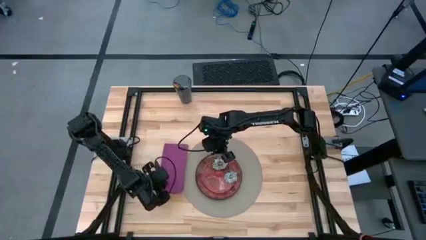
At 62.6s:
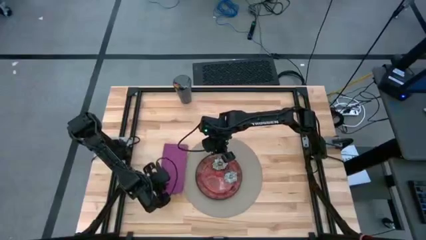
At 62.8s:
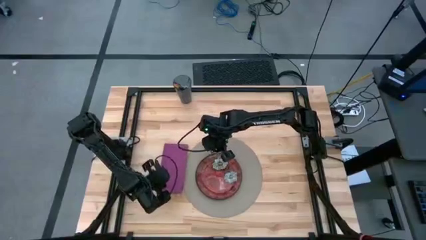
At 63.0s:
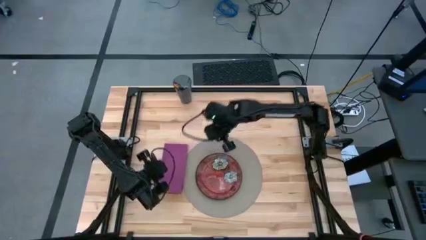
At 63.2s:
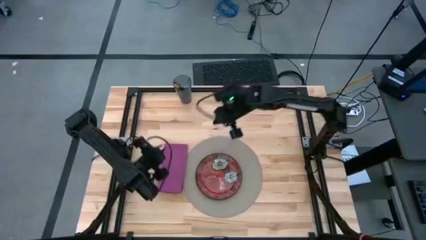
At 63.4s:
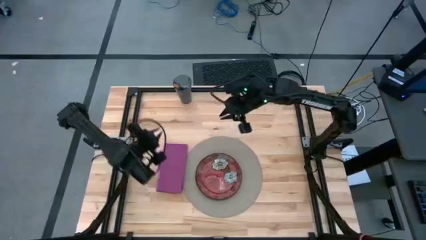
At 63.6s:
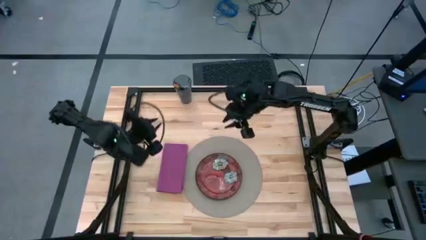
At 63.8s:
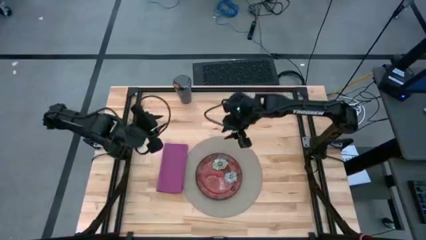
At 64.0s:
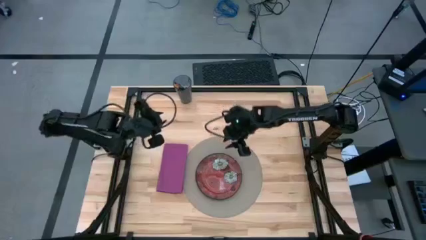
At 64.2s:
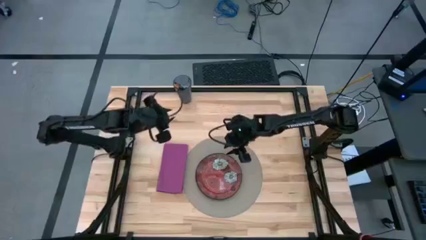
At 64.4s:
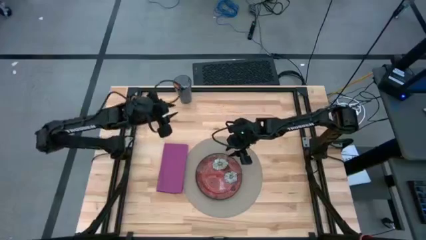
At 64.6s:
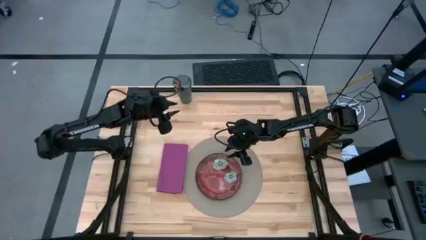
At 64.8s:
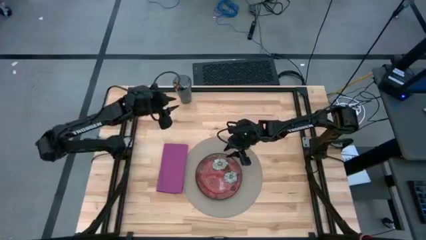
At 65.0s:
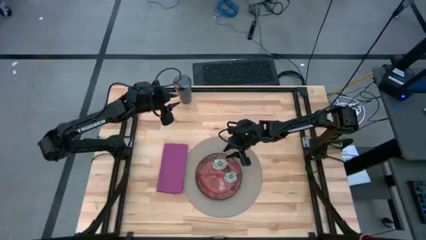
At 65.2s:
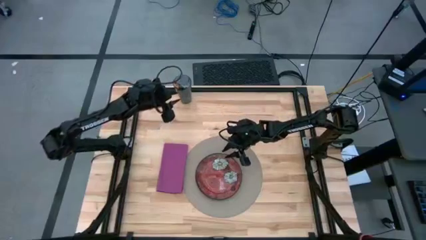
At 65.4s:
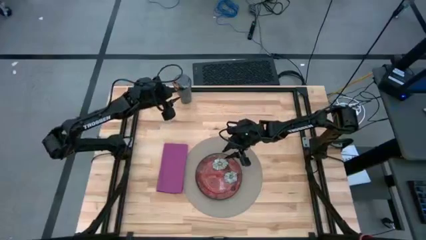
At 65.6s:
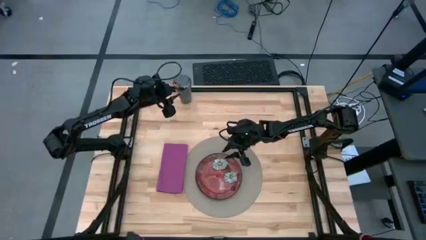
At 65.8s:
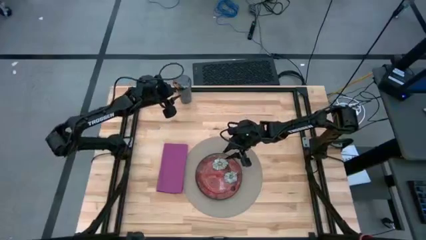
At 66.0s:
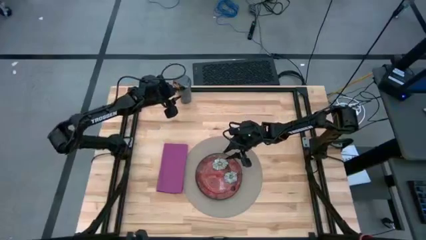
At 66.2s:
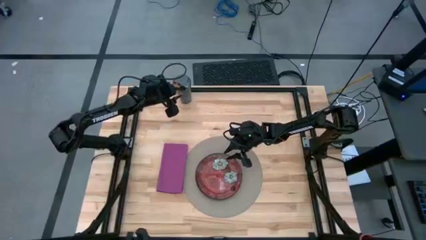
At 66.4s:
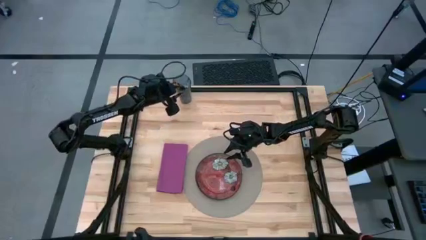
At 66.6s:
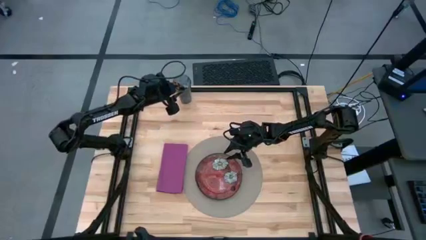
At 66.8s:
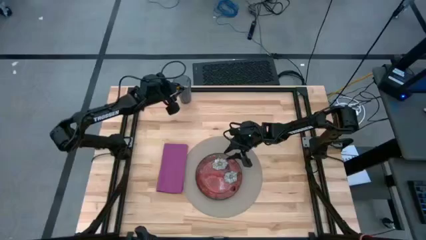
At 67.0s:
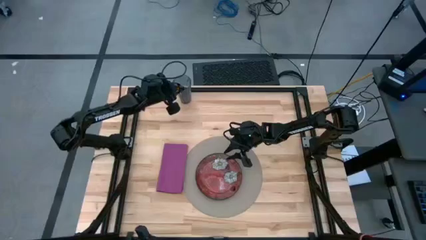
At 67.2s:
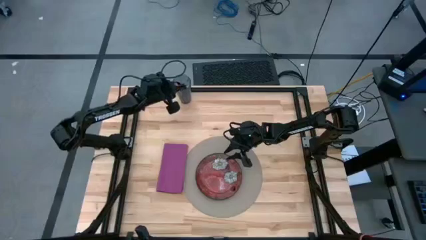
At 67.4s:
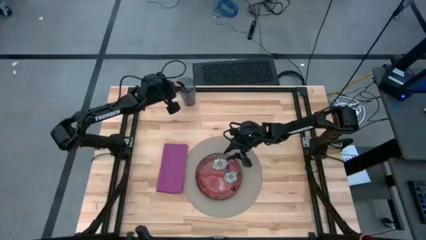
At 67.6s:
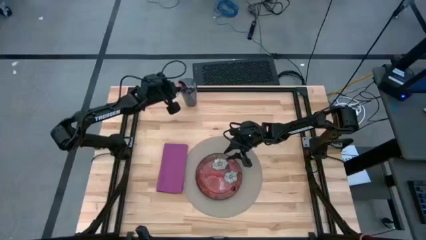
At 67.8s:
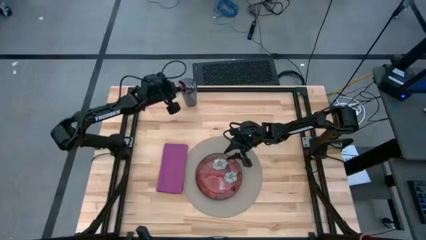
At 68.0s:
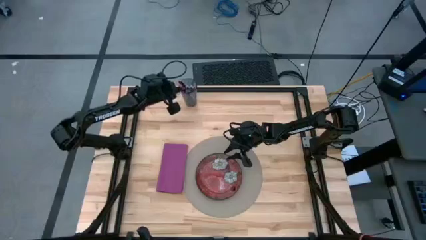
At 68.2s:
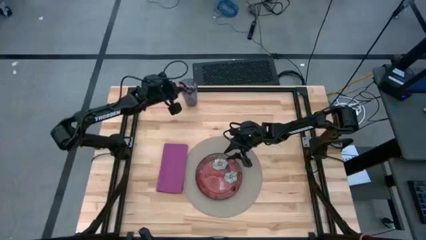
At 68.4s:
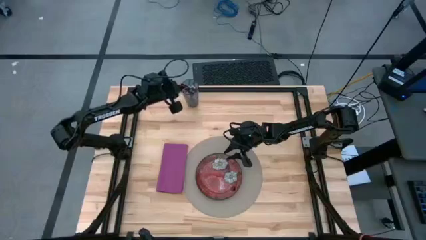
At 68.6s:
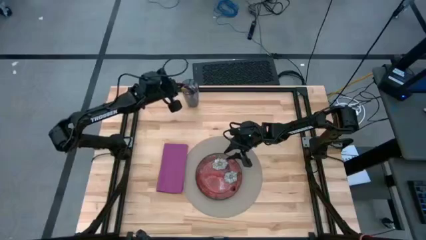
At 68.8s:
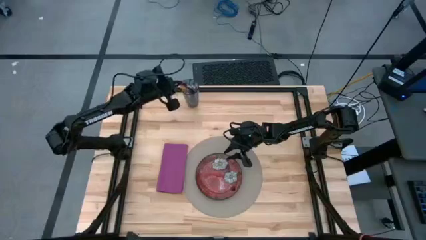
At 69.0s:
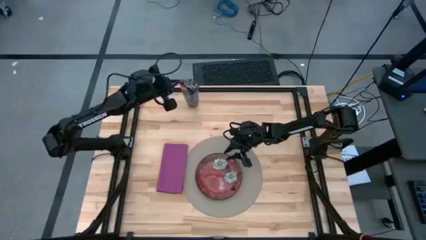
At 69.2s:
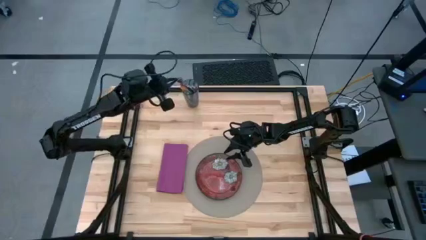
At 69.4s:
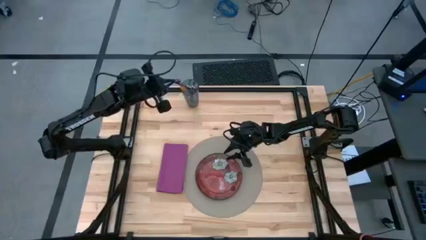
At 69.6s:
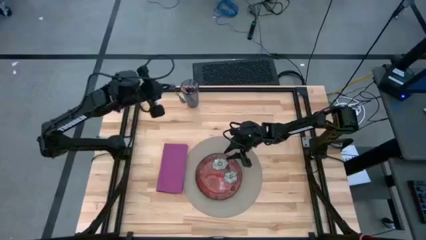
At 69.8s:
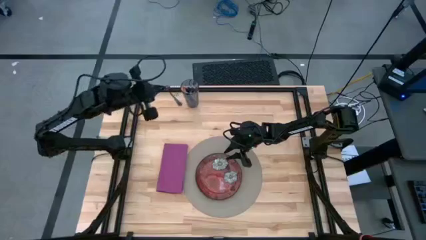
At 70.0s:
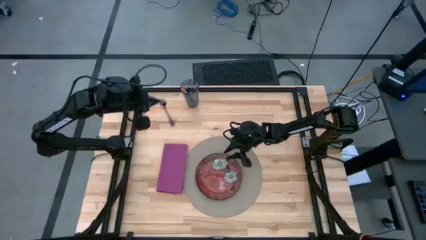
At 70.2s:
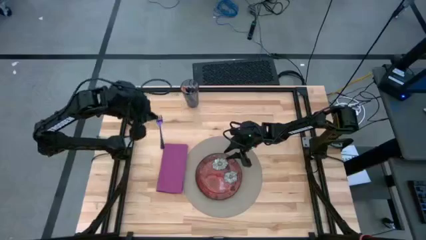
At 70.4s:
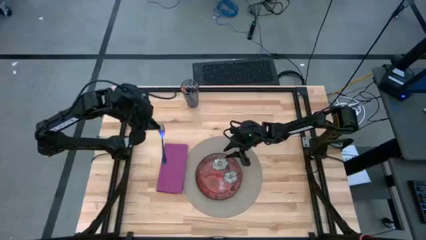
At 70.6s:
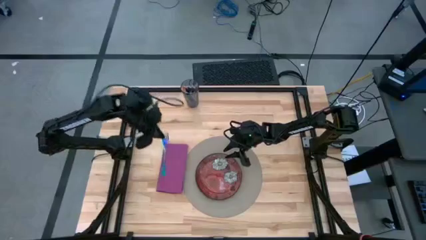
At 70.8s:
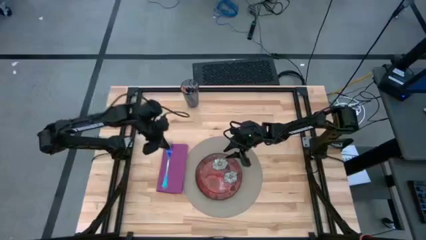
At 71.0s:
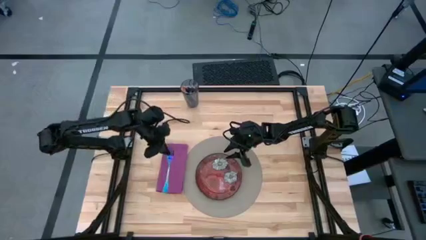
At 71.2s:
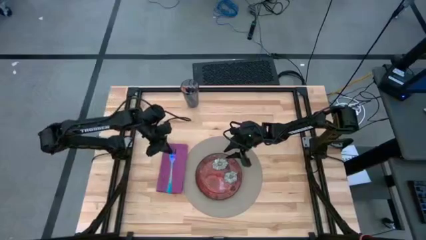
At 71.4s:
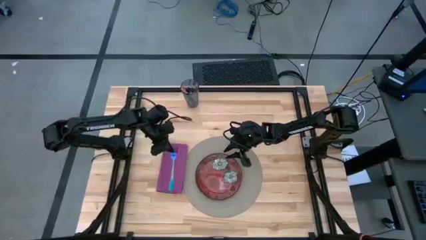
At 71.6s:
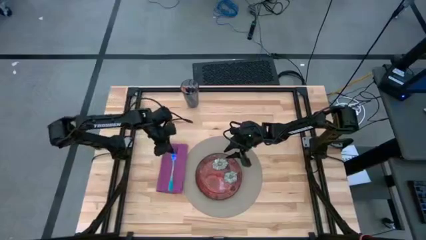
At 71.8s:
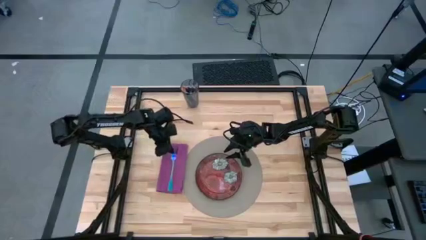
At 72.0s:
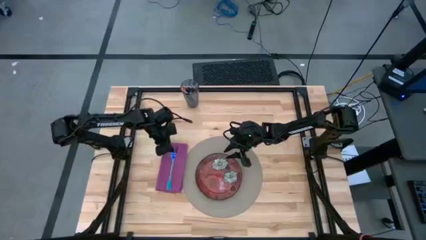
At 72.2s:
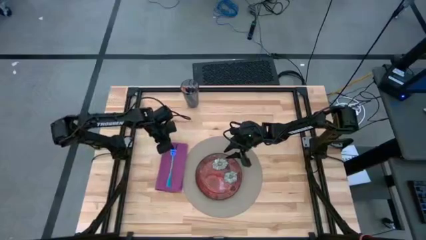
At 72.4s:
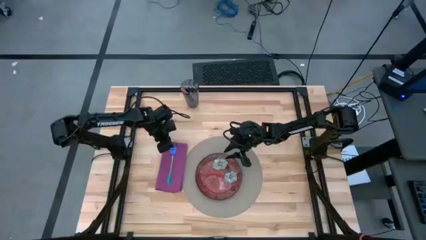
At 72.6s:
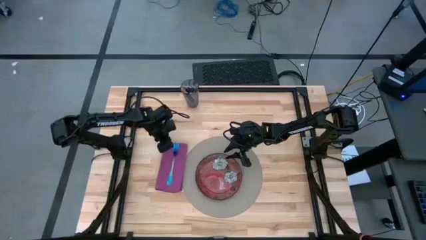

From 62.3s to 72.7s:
Task: Set table place
Put the blue fork on the pink napkin

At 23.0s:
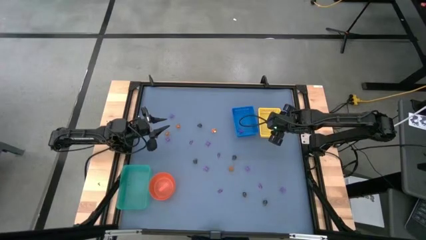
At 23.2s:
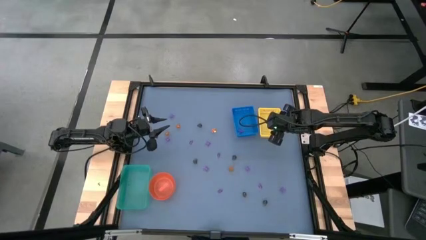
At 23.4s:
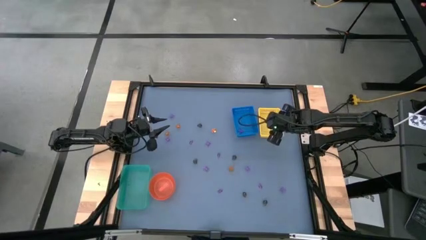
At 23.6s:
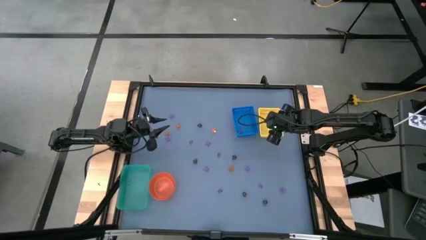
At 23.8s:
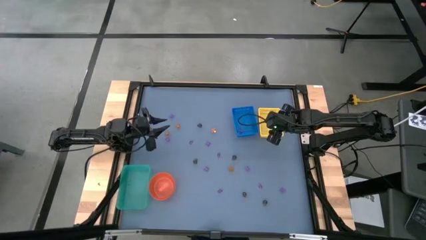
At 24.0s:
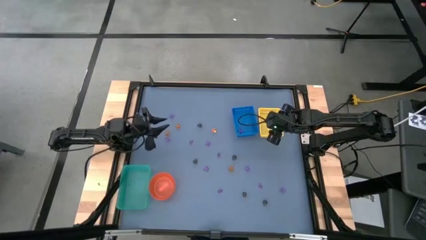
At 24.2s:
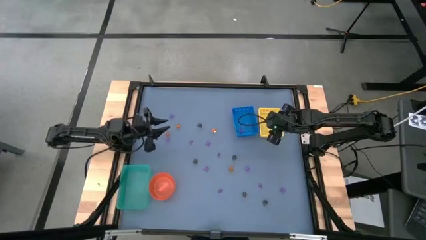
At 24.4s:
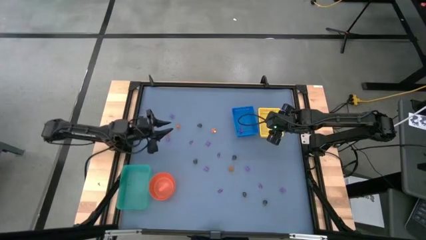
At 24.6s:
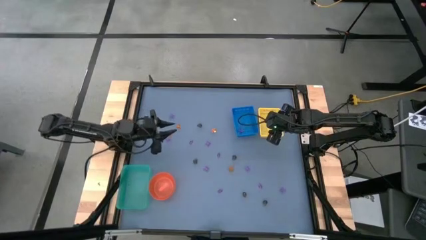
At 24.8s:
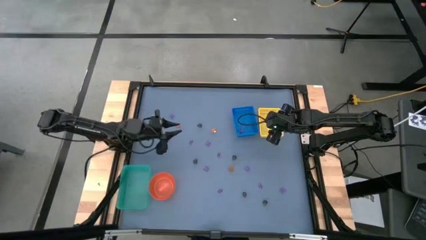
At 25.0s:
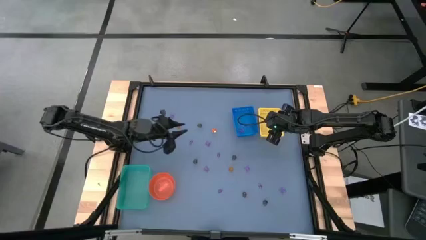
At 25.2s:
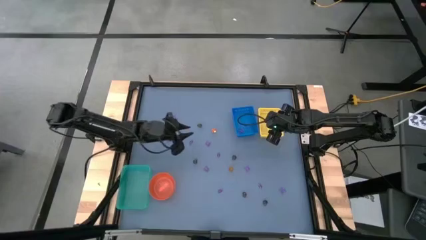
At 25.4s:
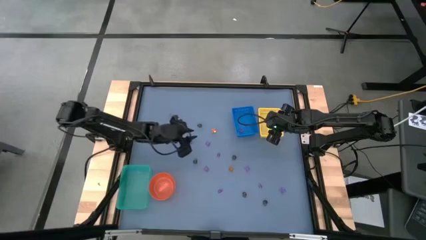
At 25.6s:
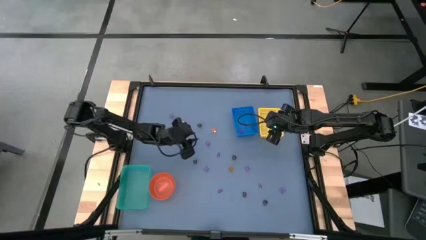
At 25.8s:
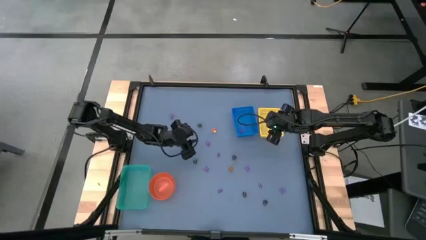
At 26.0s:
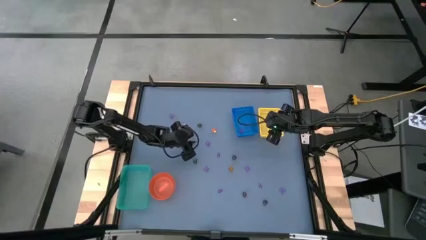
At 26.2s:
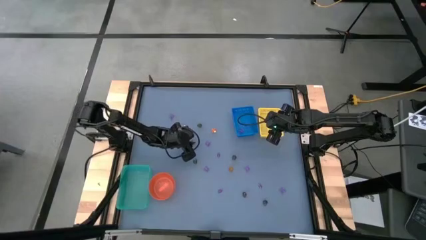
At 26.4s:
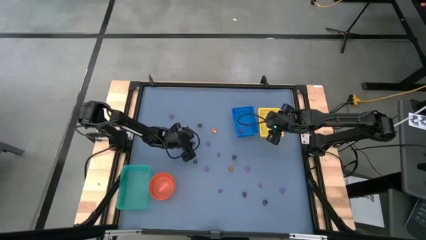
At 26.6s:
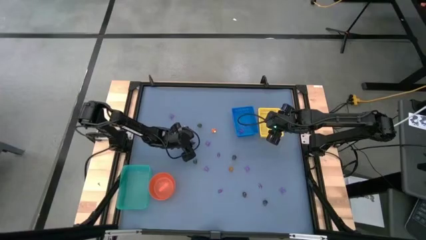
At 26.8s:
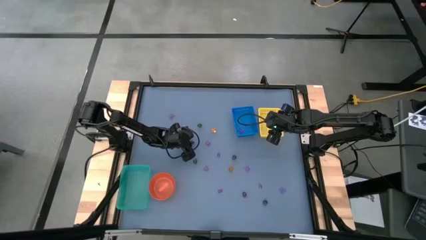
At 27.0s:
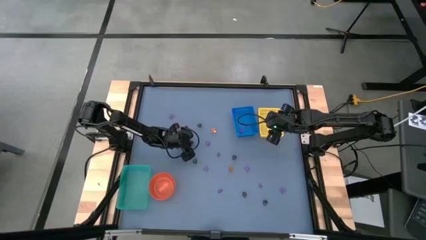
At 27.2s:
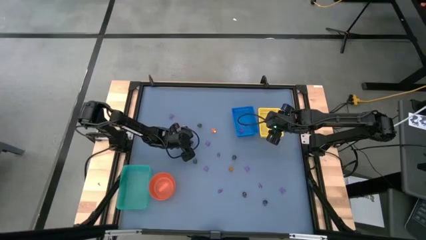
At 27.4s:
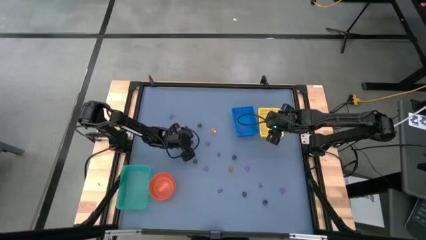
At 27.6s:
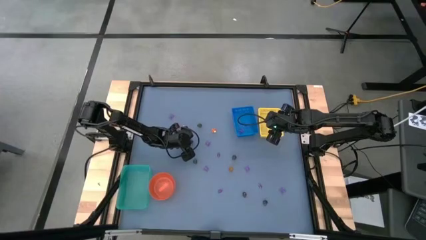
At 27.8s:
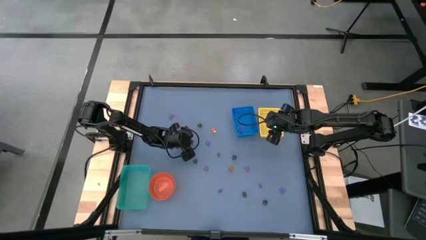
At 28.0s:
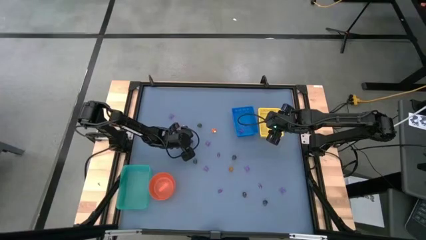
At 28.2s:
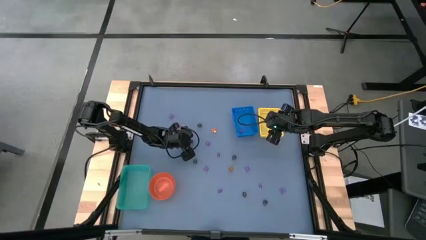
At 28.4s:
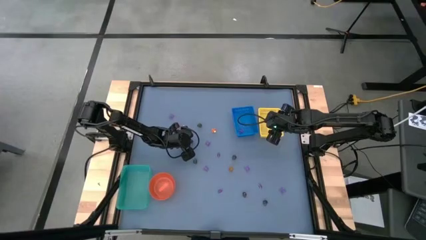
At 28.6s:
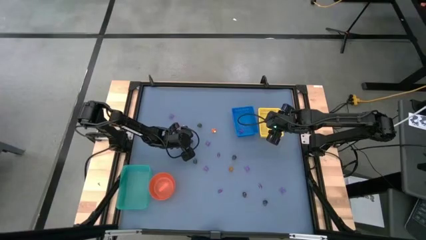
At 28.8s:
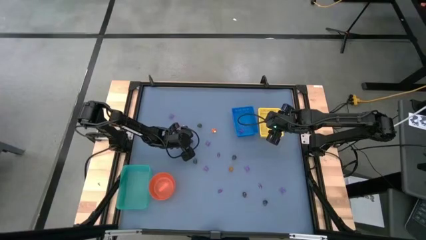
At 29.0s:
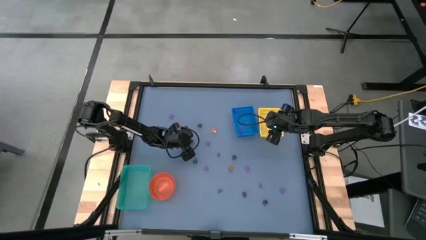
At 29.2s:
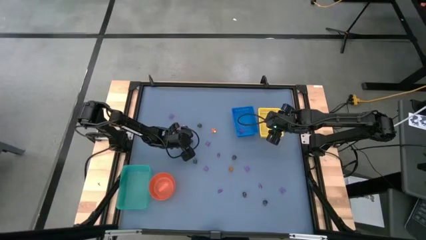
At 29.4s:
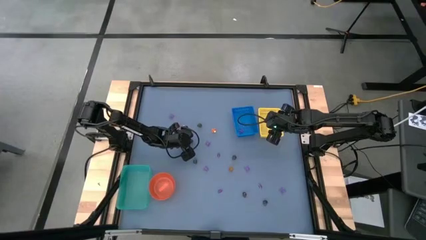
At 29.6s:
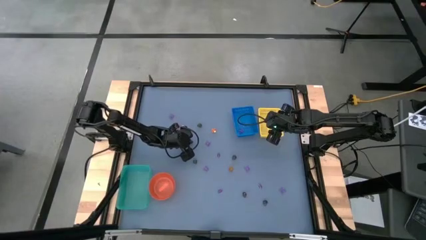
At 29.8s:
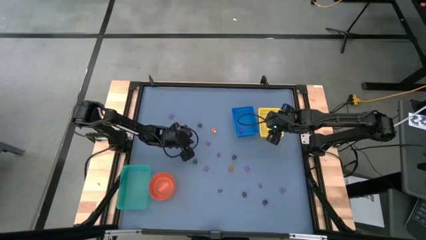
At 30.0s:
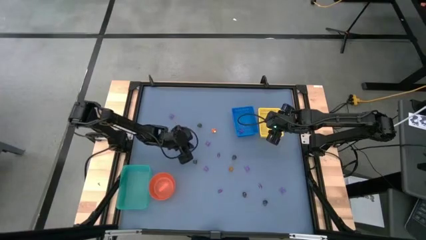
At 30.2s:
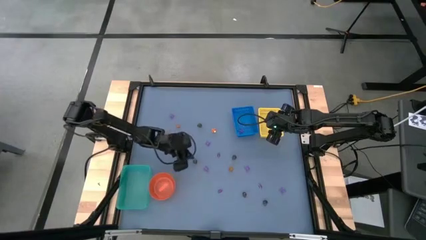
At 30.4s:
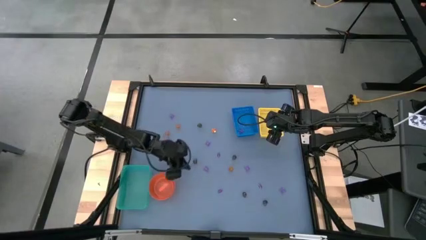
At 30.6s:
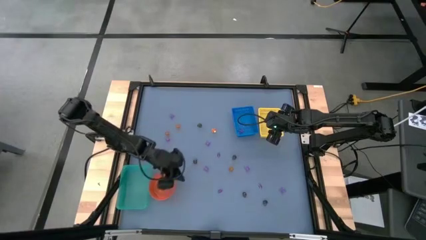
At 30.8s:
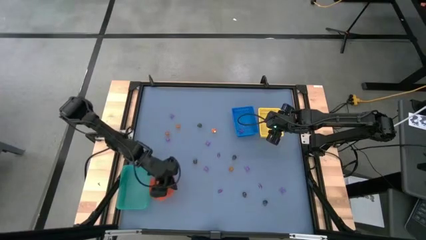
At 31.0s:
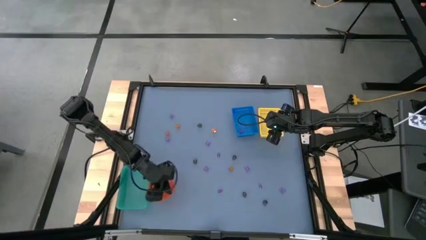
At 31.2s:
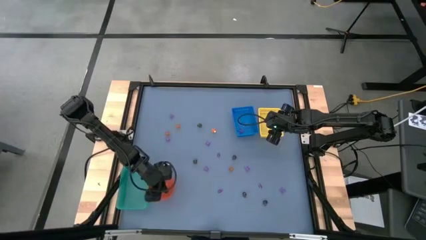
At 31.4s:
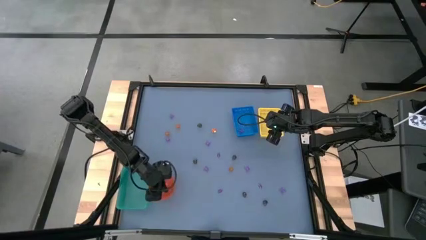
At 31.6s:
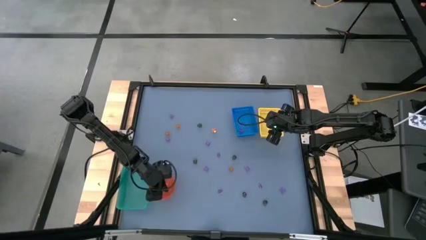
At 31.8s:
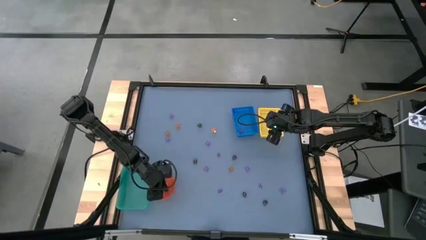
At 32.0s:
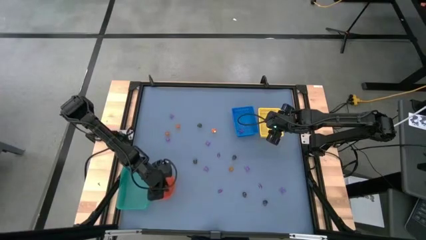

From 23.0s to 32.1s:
Task: Sort Halloween decoration
Put the violet witch hat toy into the orange bin
